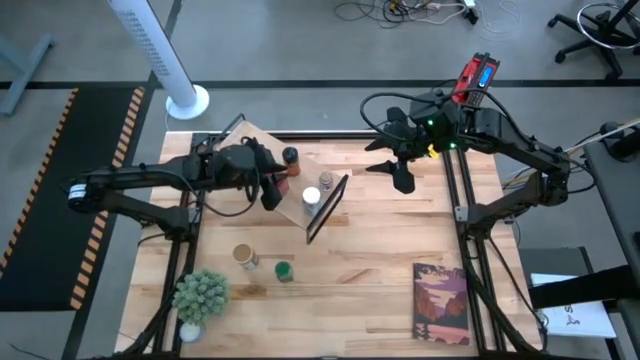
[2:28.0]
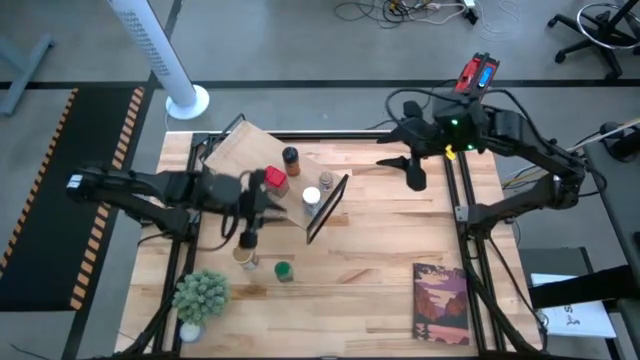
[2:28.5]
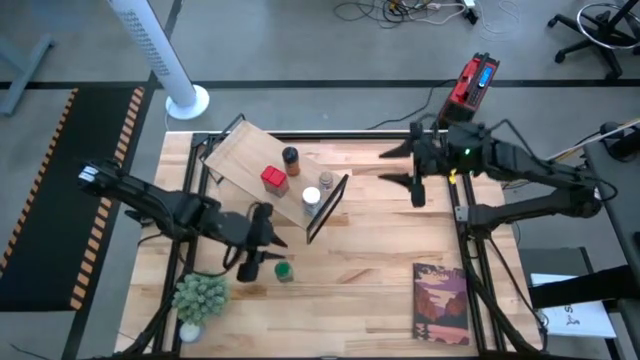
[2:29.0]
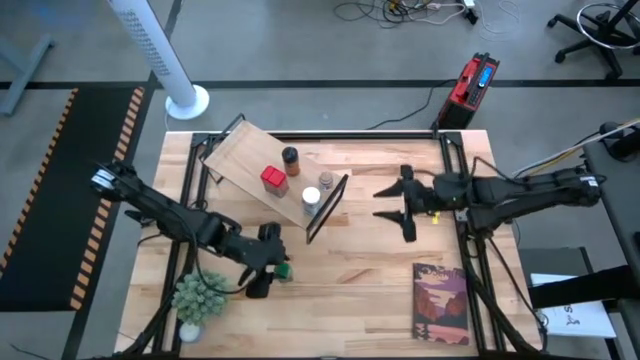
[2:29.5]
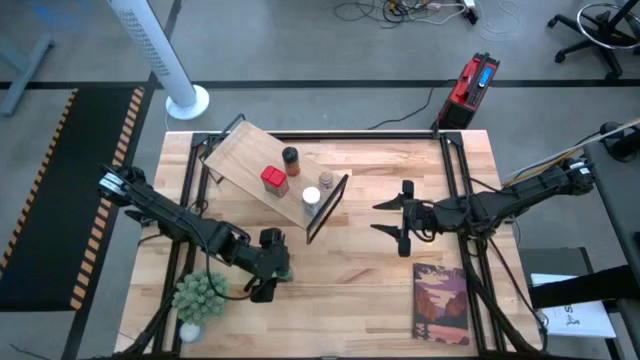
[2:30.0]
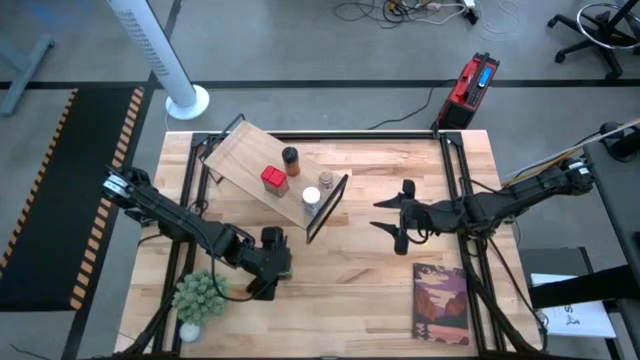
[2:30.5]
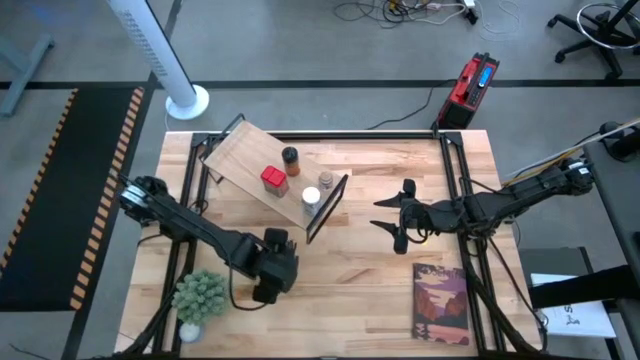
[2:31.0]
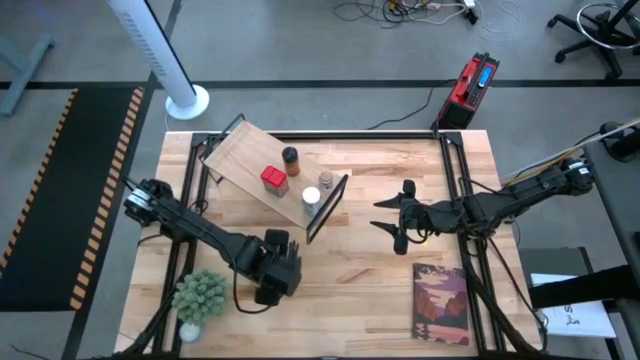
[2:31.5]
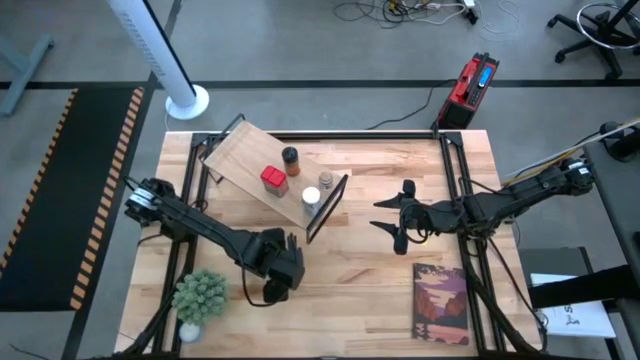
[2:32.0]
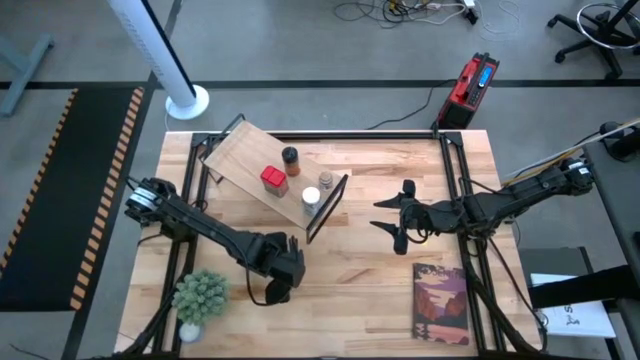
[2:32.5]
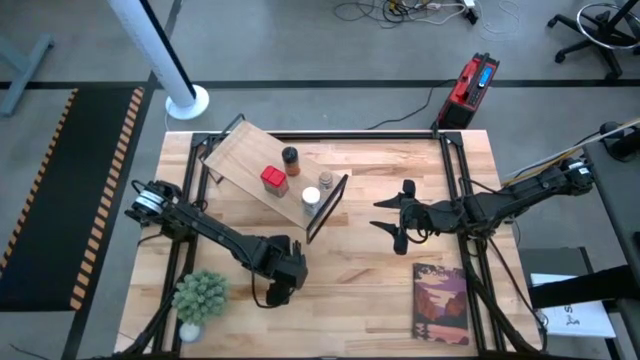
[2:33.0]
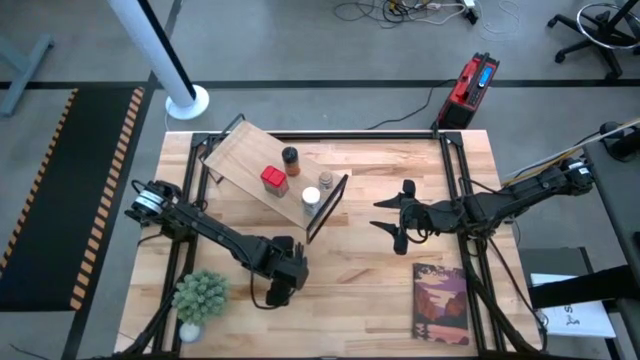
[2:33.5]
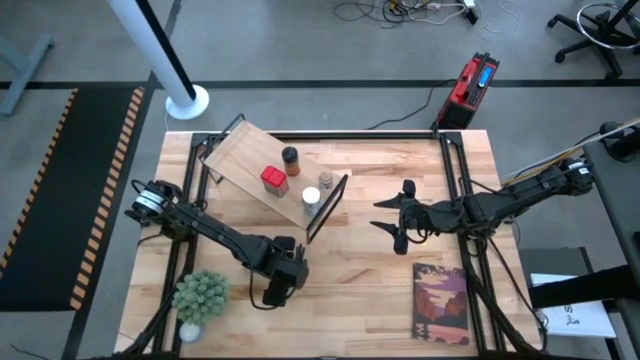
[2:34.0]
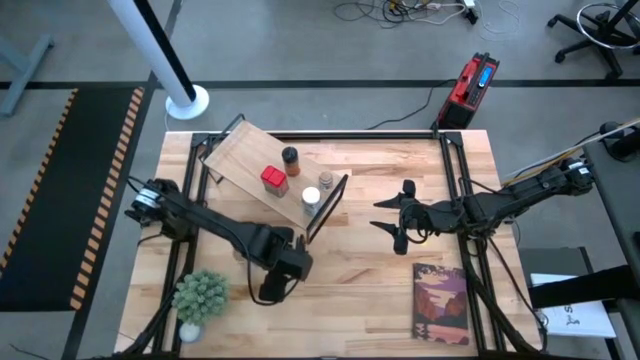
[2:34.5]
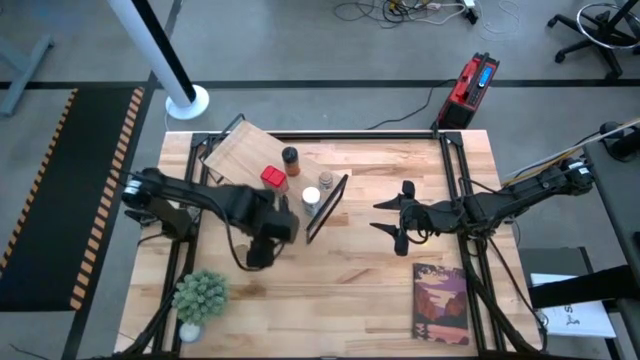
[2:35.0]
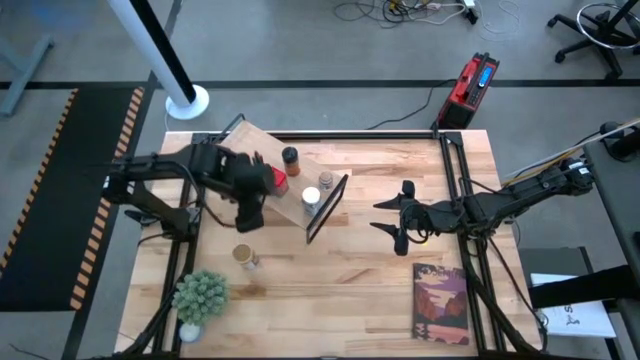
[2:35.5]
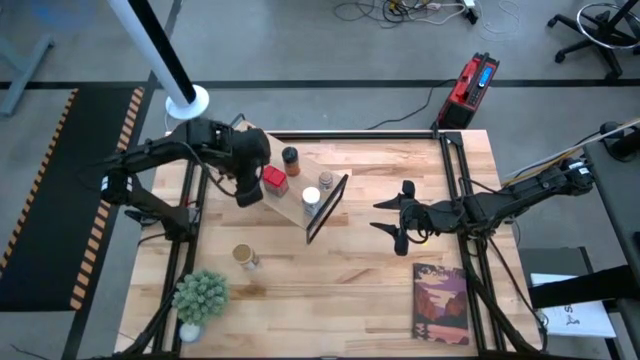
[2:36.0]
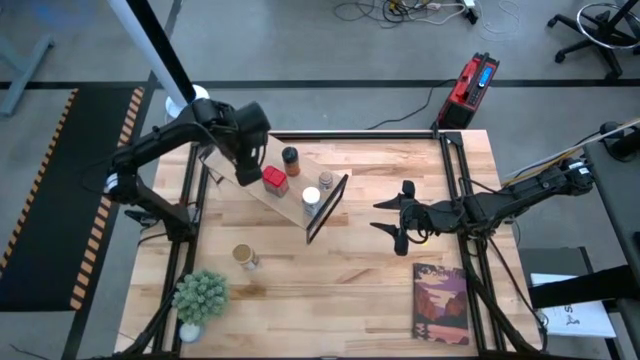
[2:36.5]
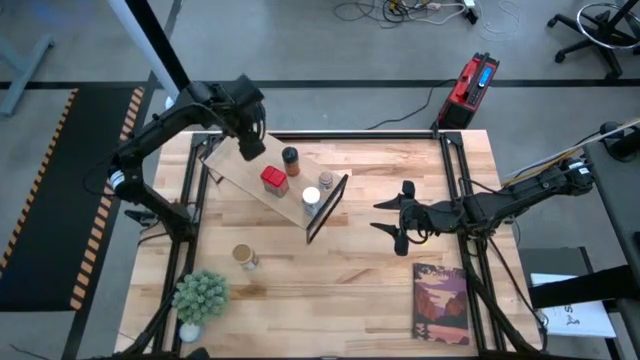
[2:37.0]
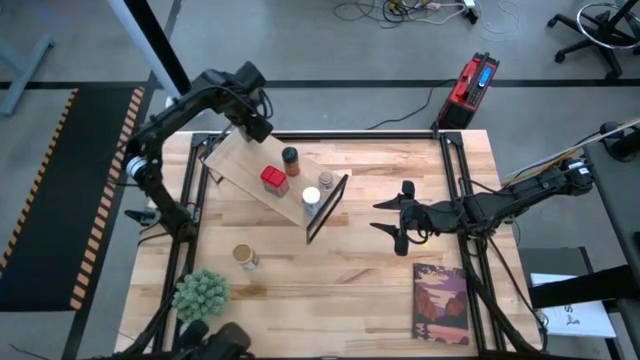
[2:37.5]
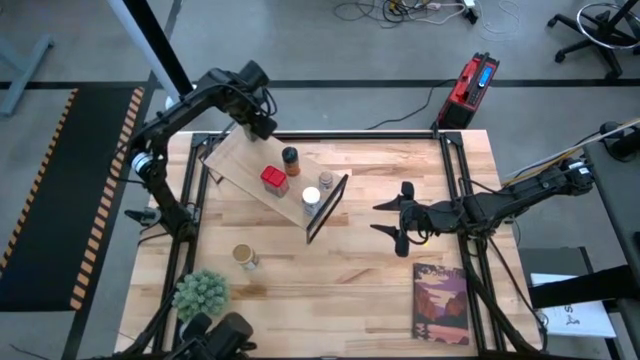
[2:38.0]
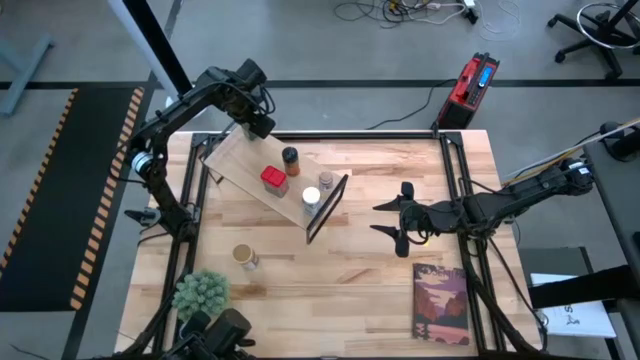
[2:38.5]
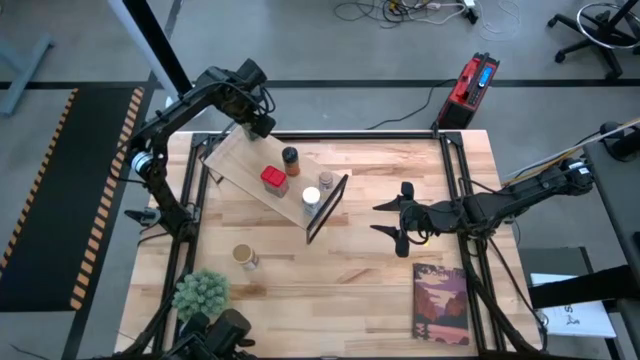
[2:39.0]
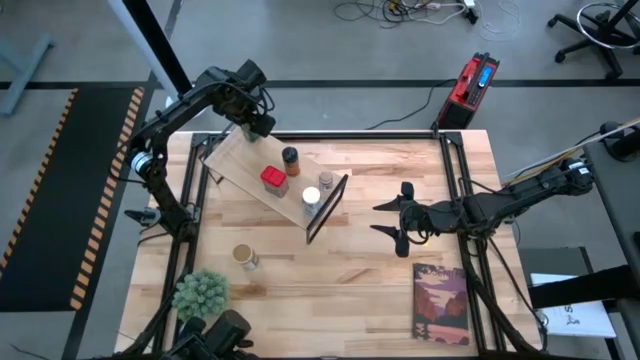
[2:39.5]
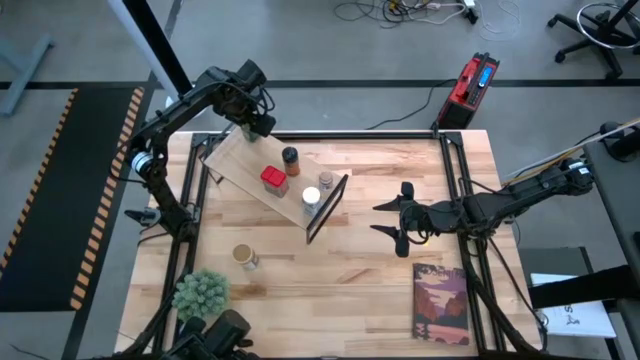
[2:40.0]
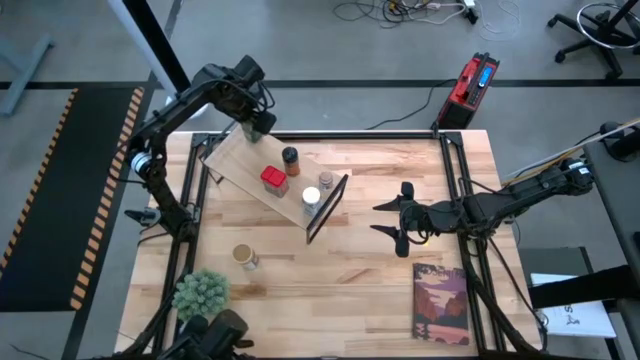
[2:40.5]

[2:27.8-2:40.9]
Task: Shelf spices
Put the green seasoning bottle on the shelf

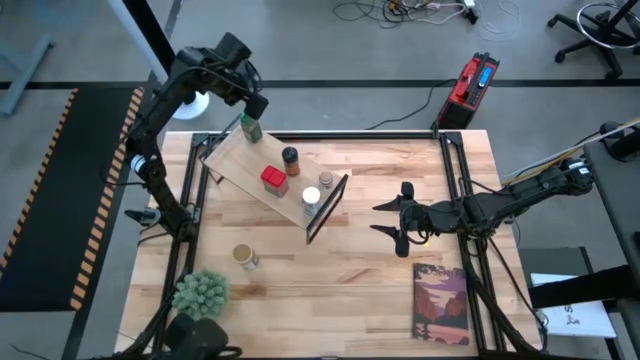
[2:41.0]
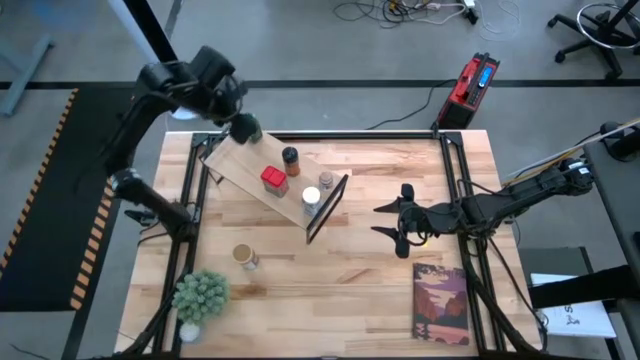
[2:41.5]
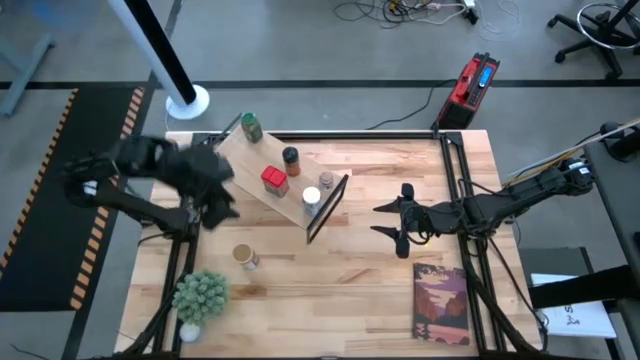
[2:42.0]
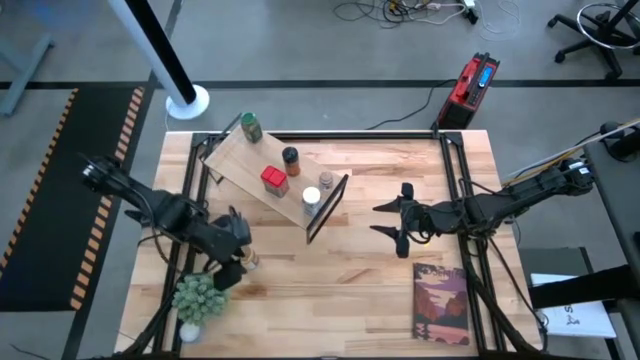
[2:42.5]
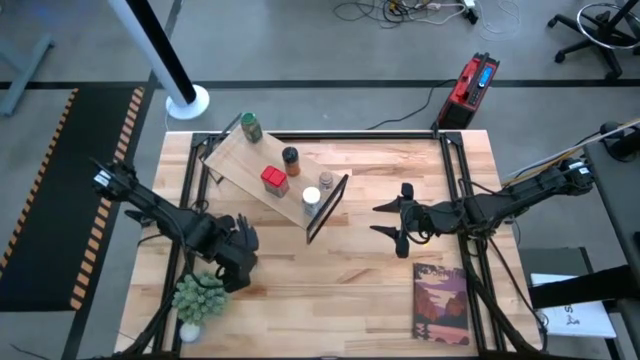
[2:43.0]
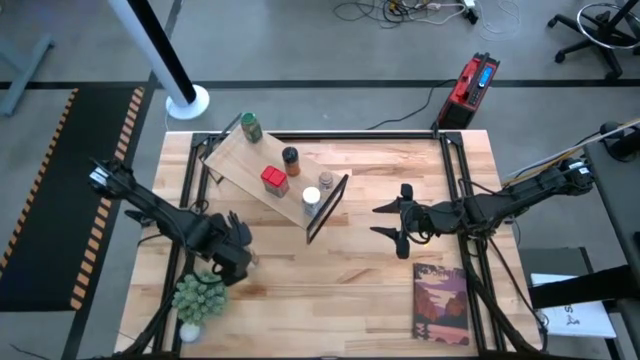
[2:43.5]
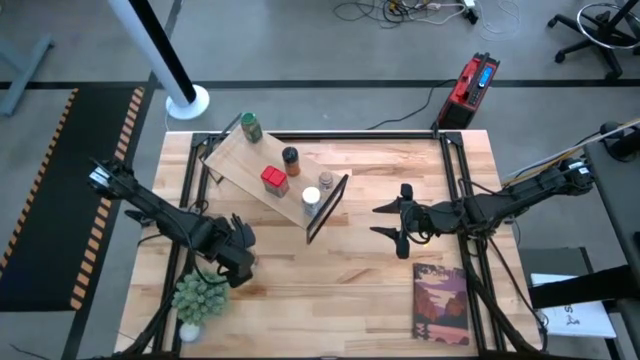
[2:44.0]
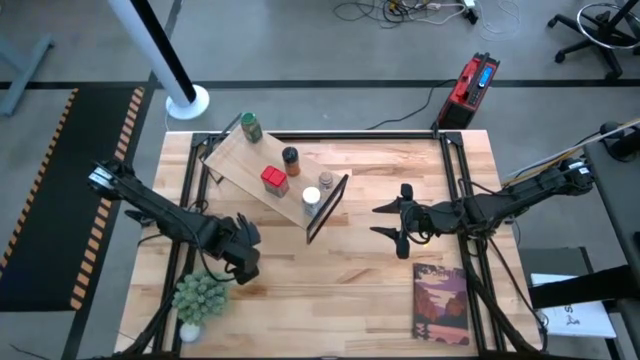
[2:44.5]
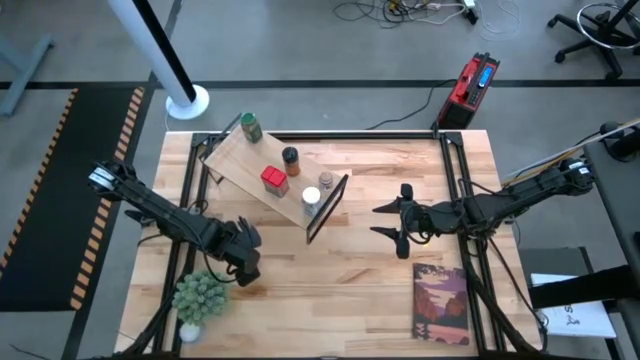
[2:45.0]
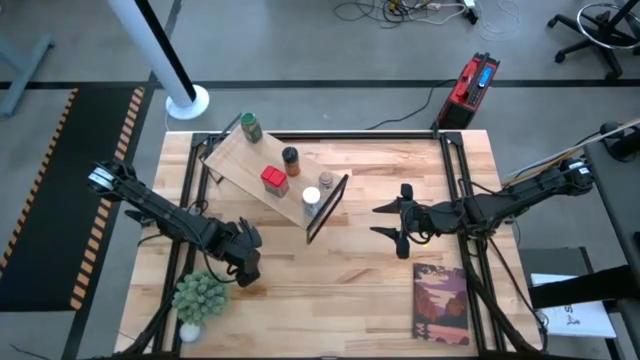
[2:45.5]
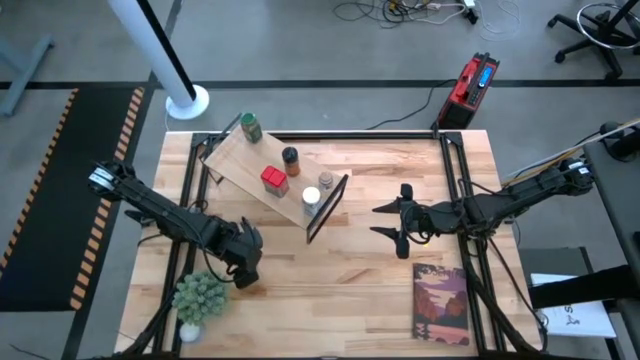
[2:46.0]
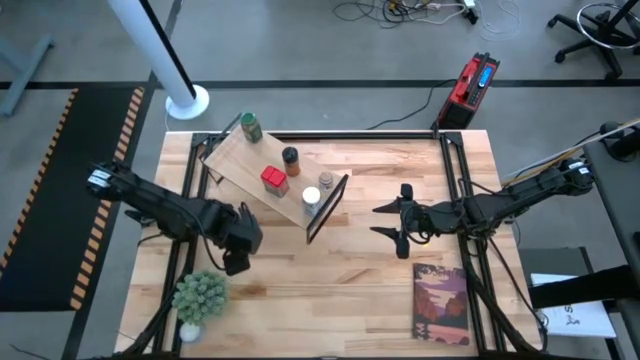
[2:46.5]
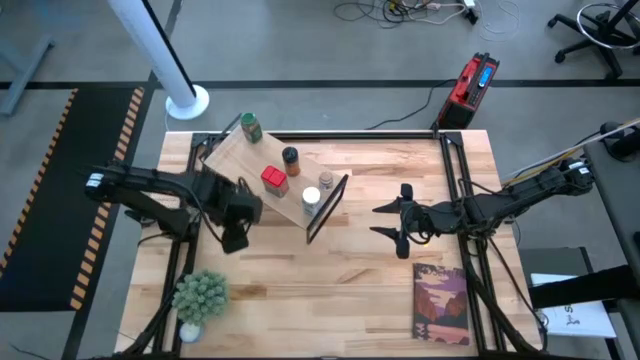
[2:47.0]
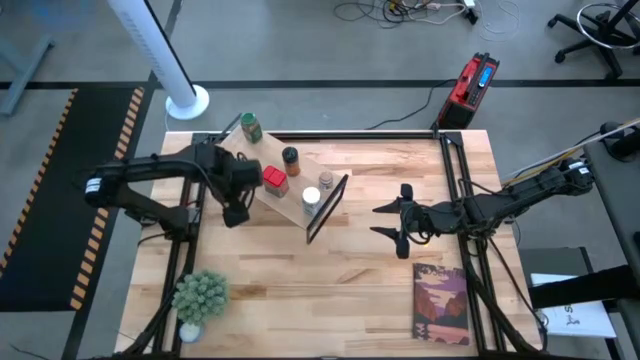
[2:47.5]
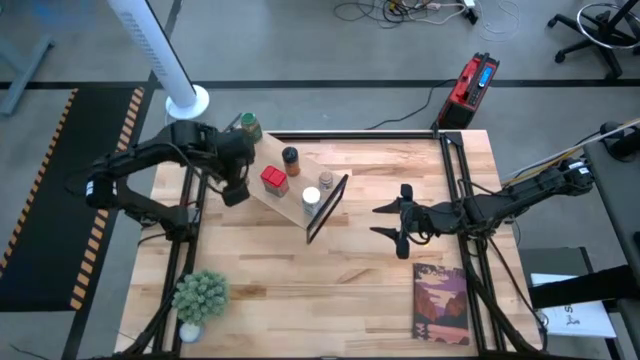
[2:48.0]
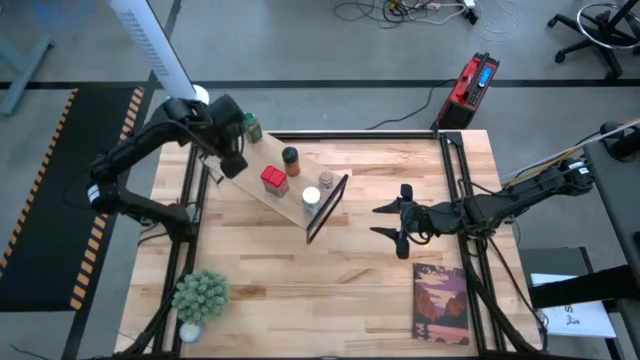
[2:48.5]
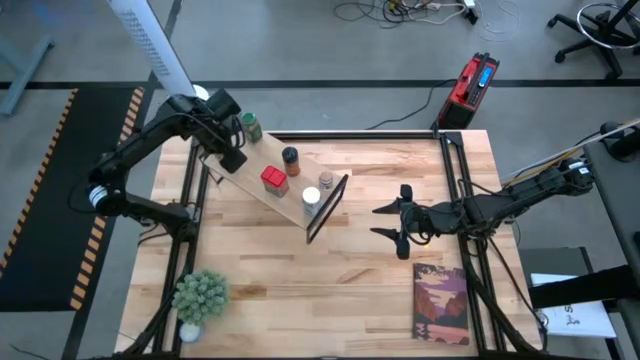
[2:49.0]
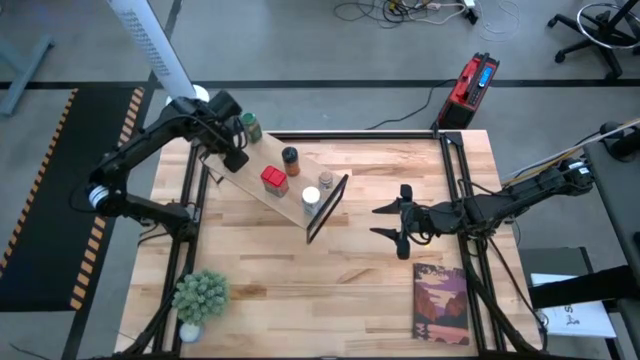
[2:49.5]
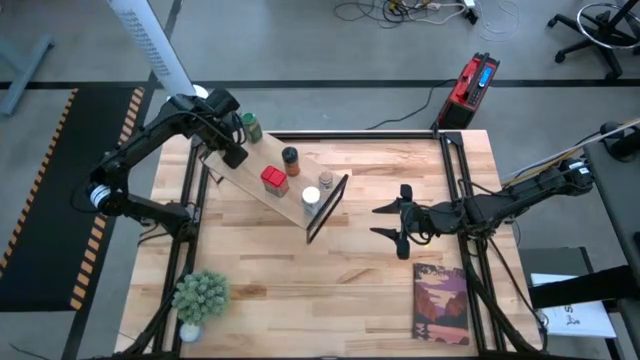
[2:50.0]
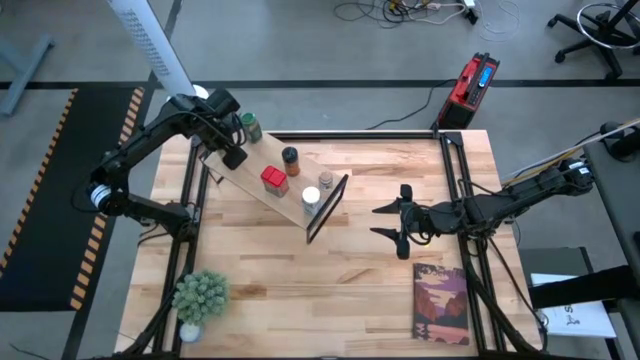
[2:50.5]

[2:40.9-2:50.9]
Put the gold seasoning bottle on the shelf
